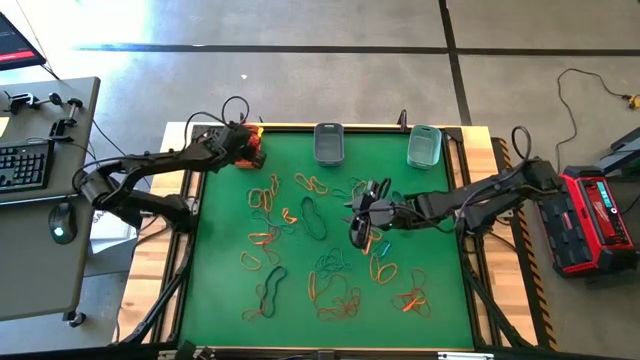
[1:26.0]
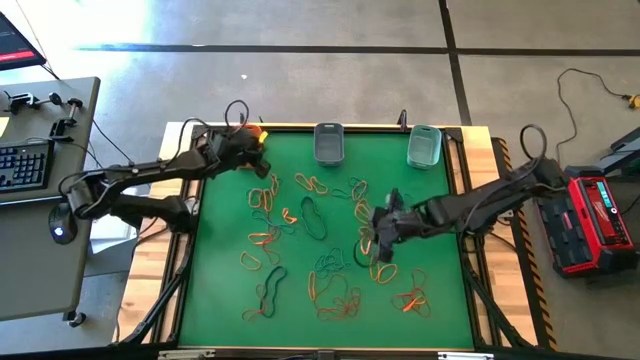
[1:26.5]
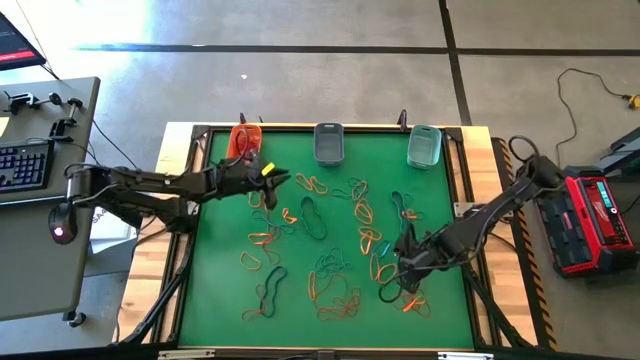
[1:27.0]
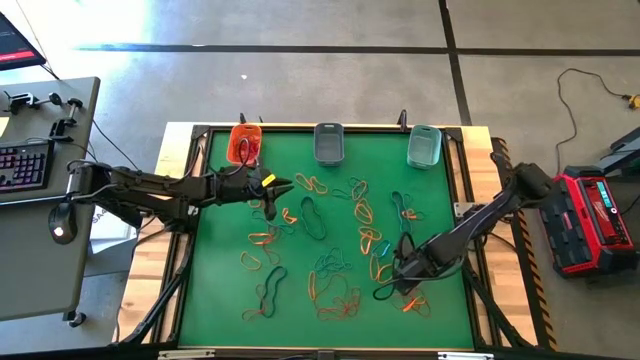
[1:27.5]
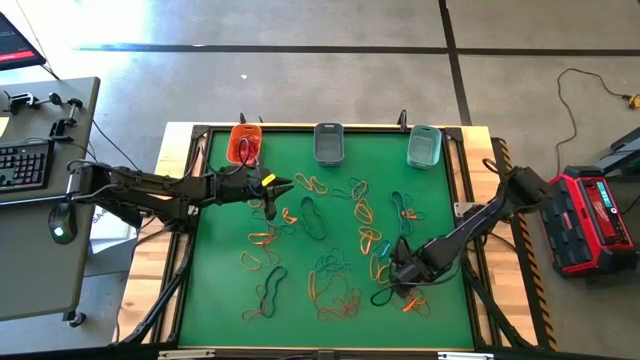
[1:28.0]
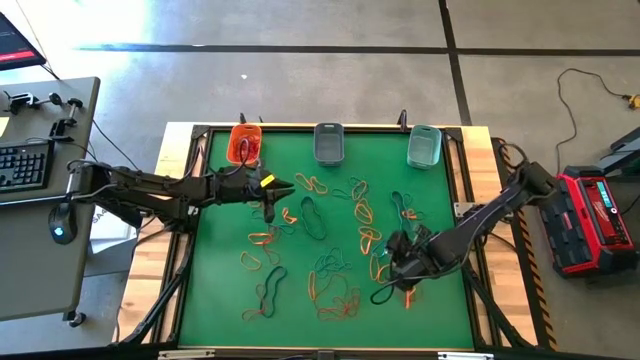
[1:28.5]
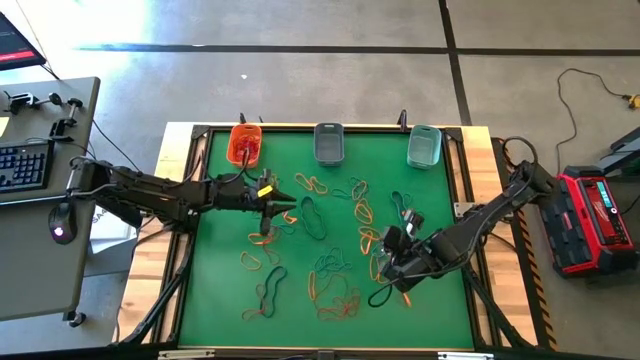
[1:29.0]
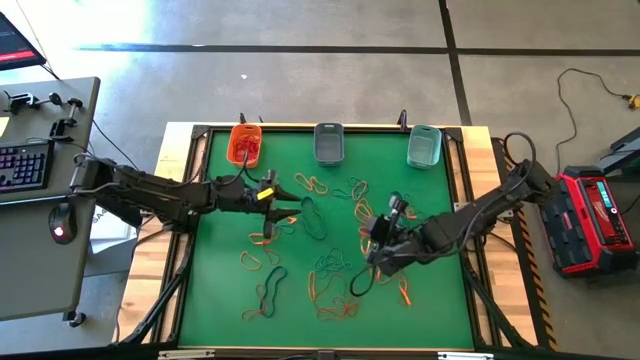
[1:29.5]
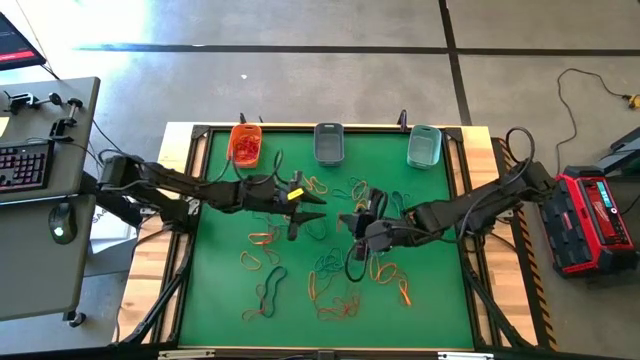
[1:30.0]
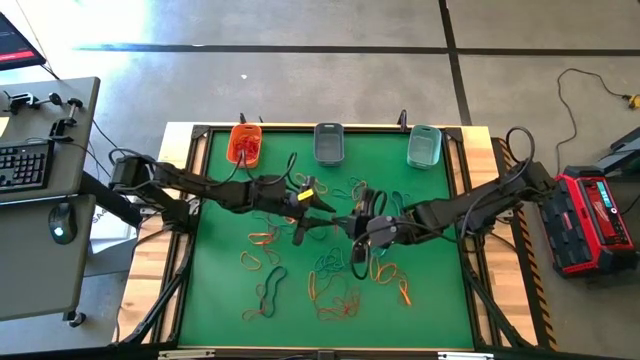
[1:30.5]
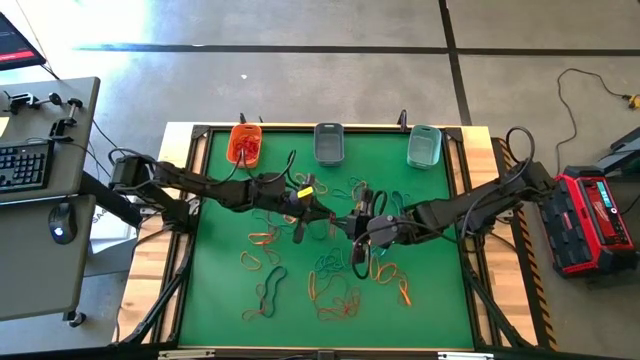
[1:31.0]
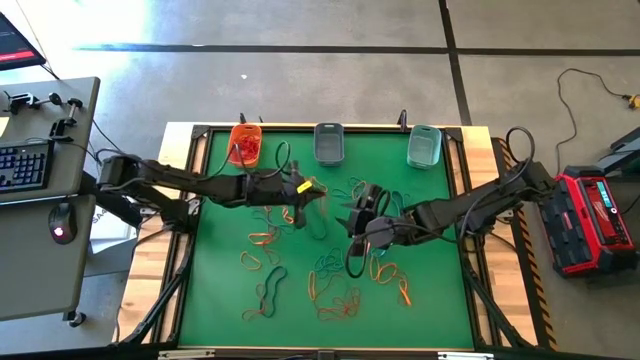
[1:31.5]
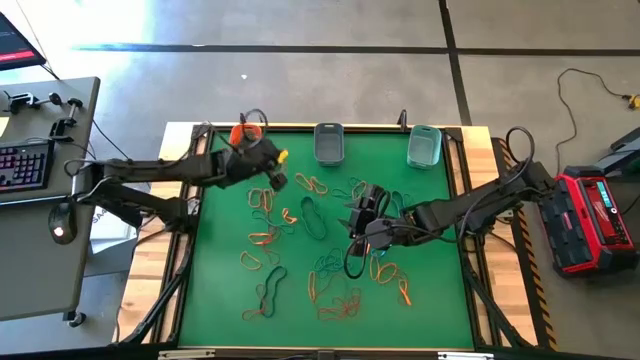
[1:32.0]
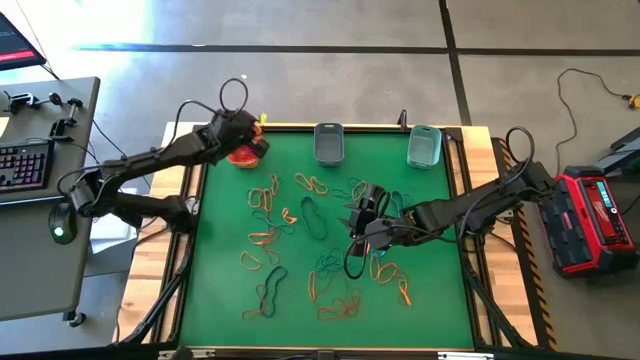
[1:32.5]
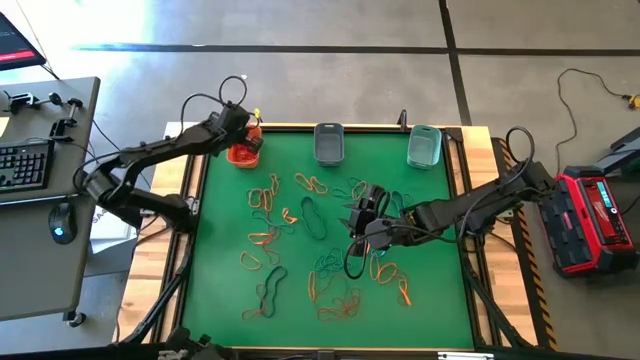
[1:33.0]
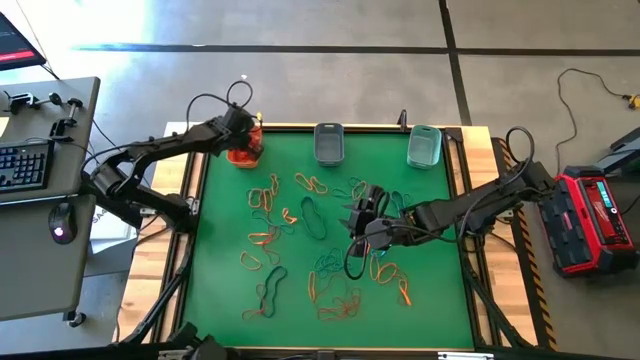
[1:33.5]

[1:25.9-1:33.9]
Task: Sort rubber bands into baskets
Put the red rubber band into the orange bin

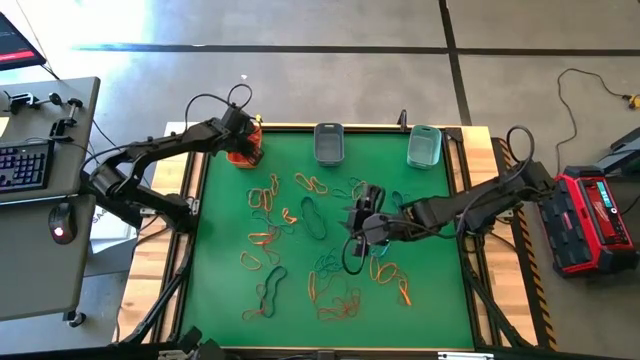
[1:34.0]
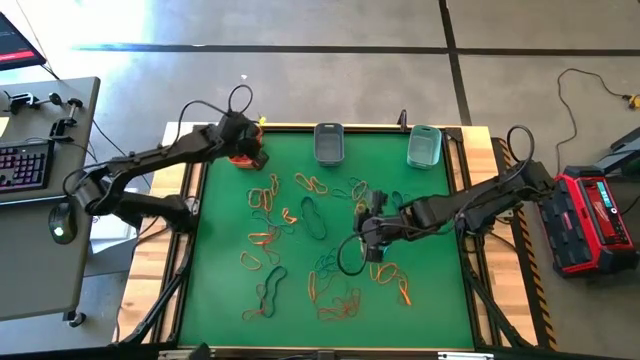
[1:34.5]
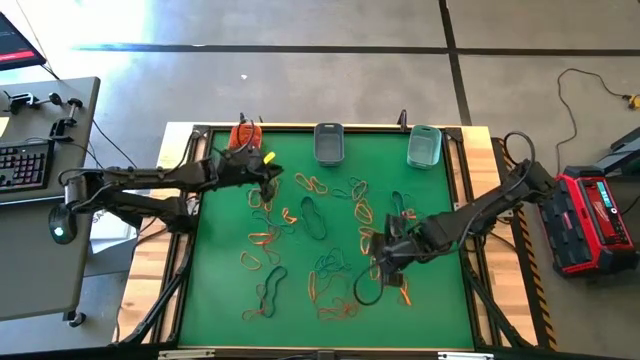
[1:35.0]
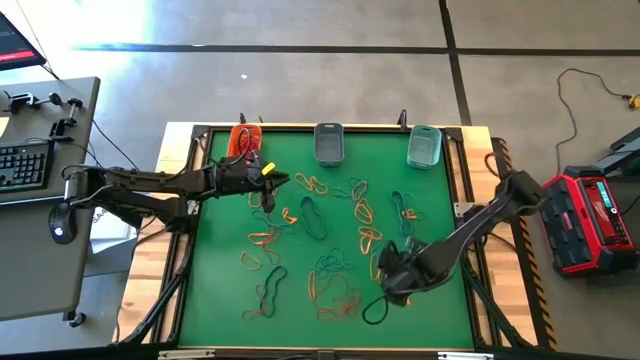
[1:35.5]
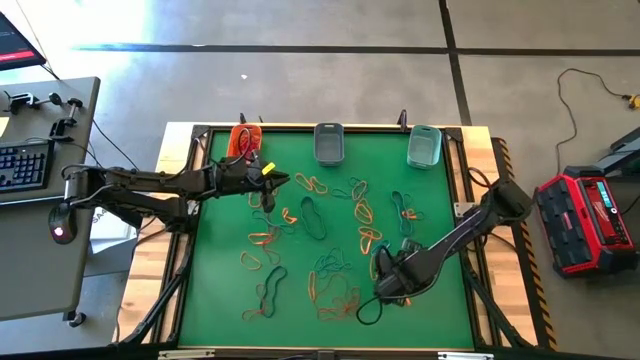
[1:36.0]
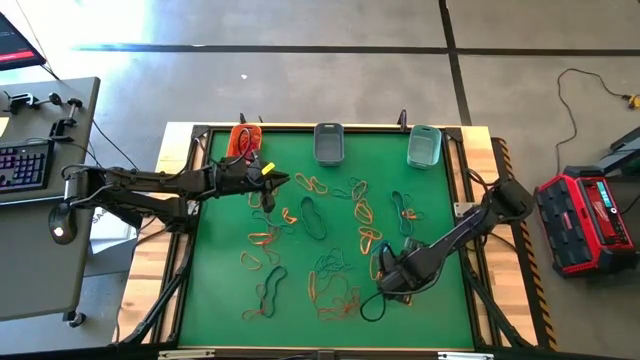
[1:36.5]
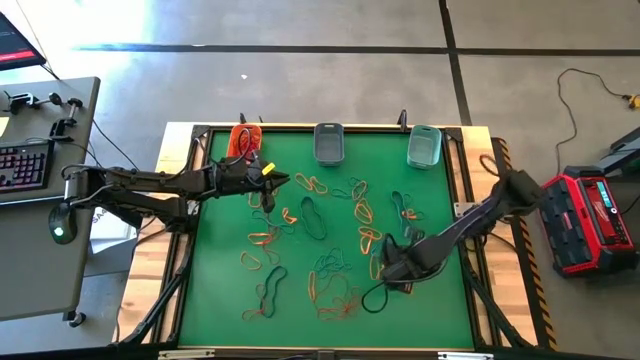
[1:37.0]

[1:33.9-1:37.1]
Put the red rubber band into the orange bin

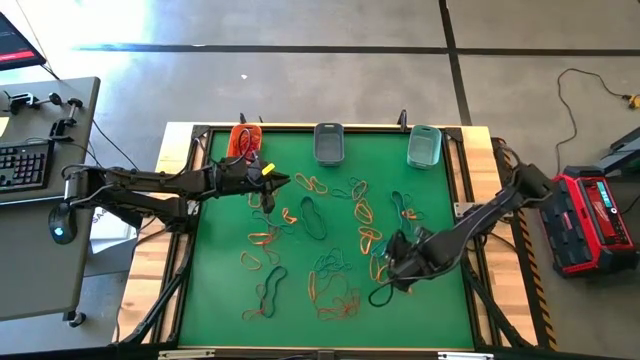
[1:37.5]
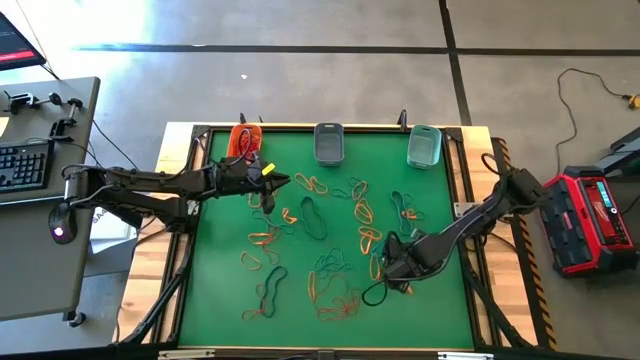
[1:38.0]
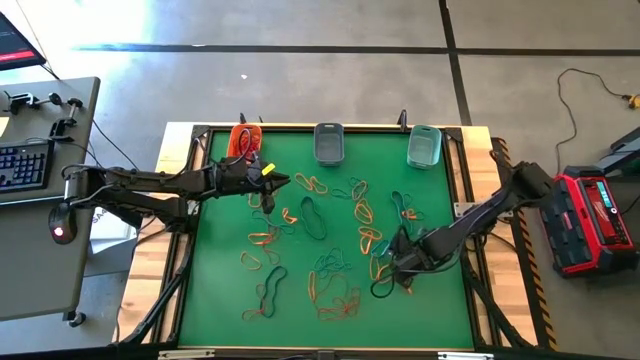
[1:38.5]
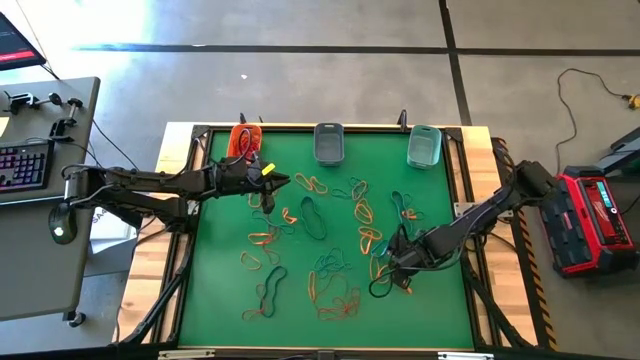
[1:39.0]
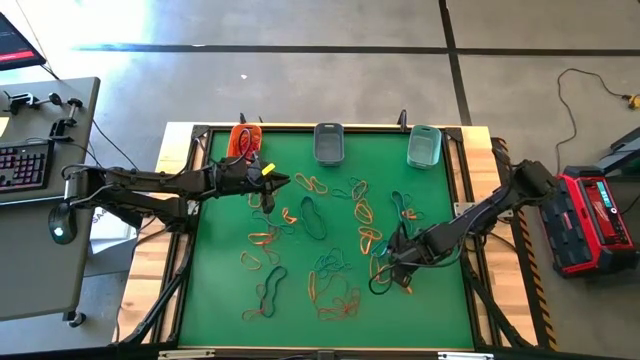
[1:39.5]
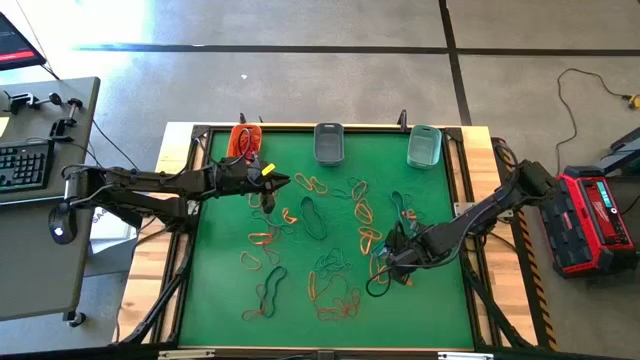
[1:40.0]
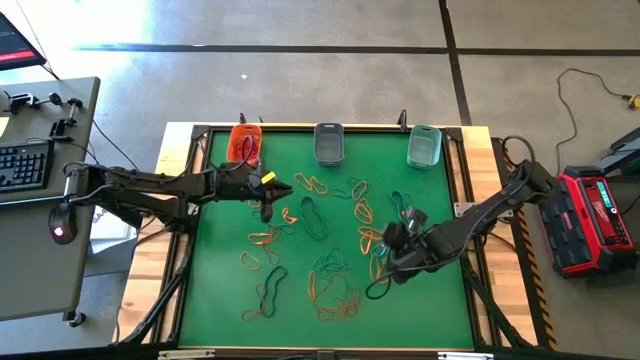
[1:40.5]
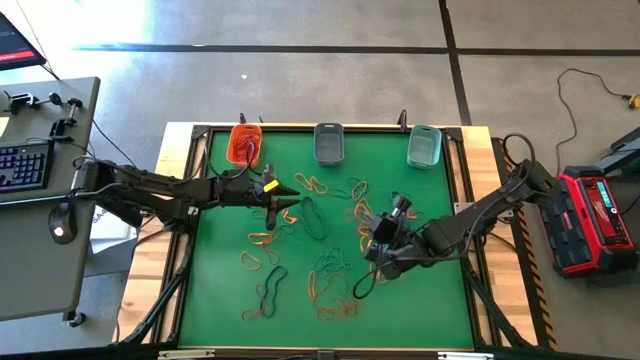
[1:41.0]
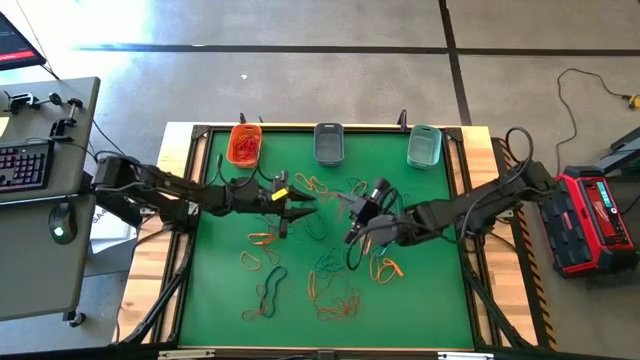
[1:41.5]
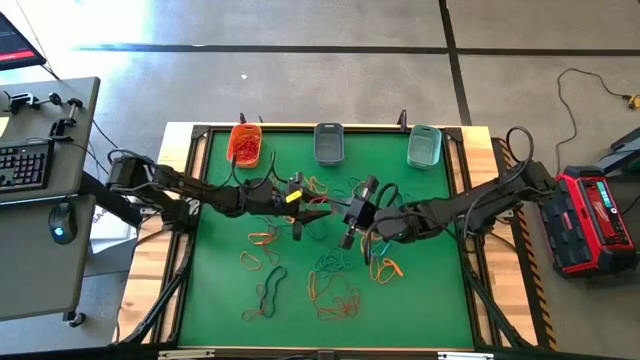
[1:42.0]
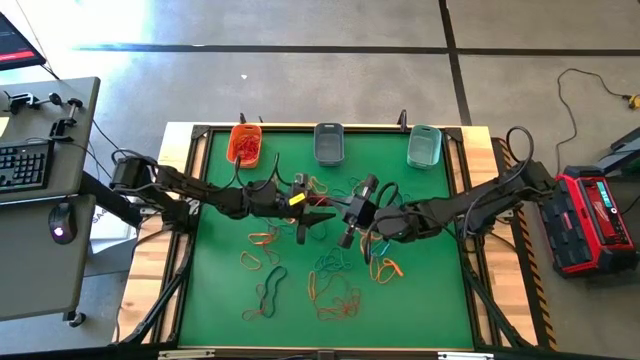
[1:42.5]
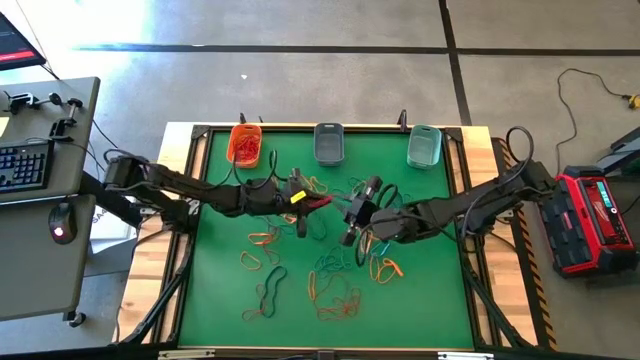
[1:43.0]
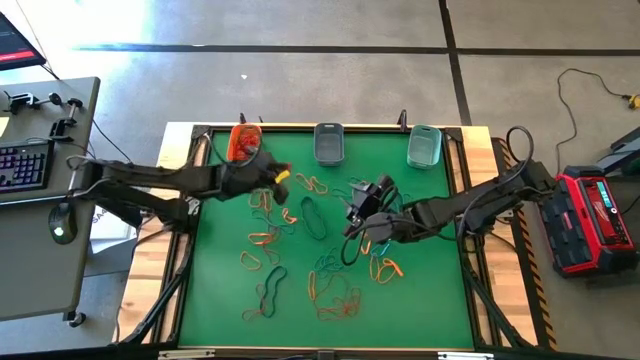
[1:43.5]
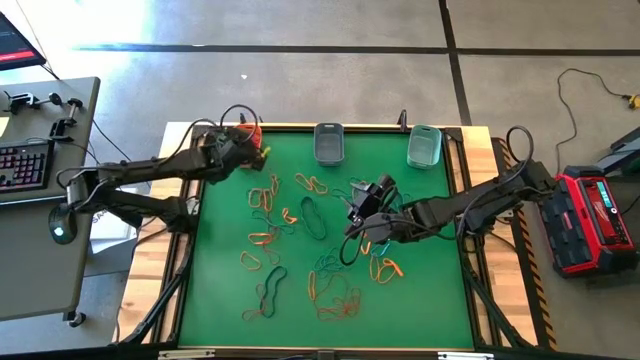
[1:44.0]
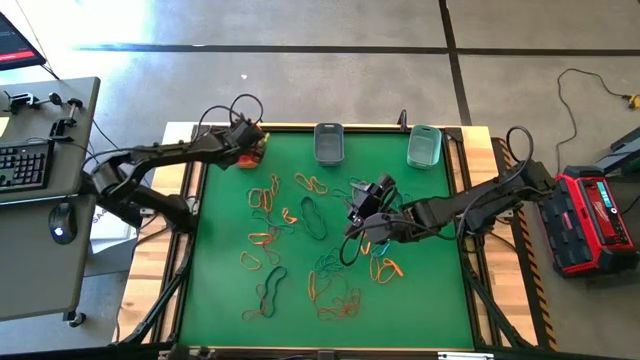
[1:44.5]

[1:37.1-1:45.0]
Put the red rubber band into the orange bin
